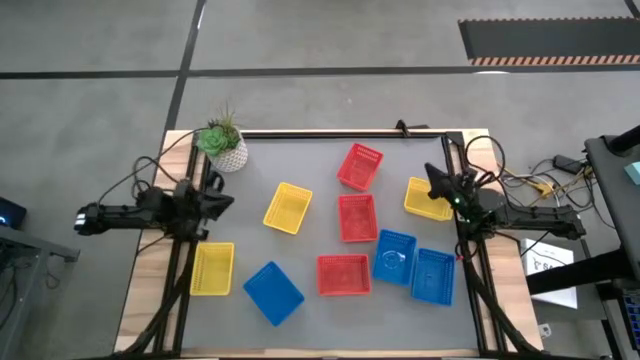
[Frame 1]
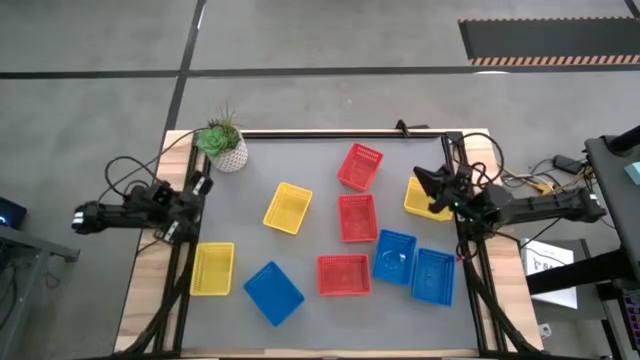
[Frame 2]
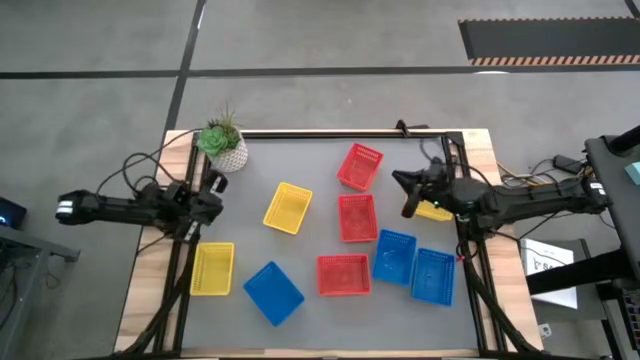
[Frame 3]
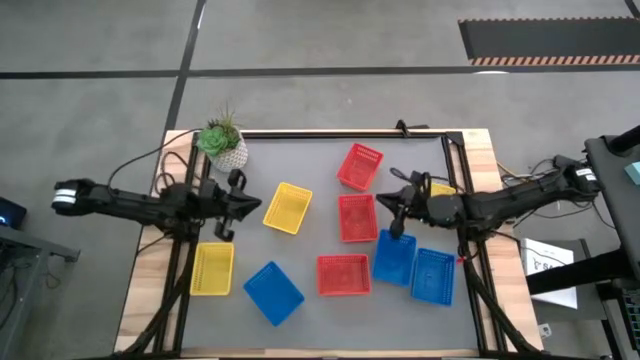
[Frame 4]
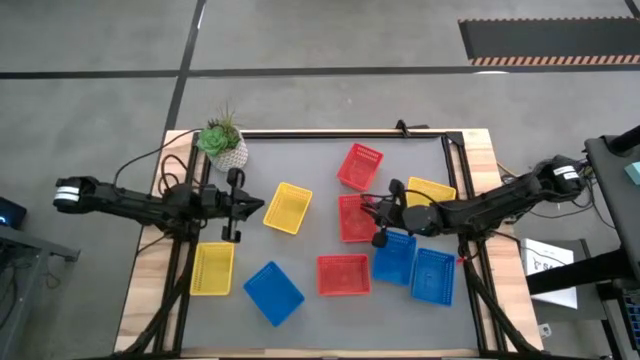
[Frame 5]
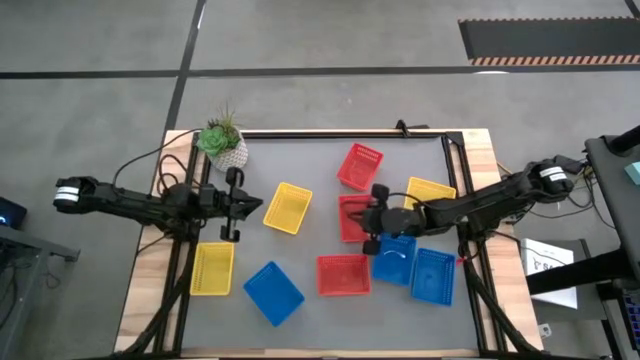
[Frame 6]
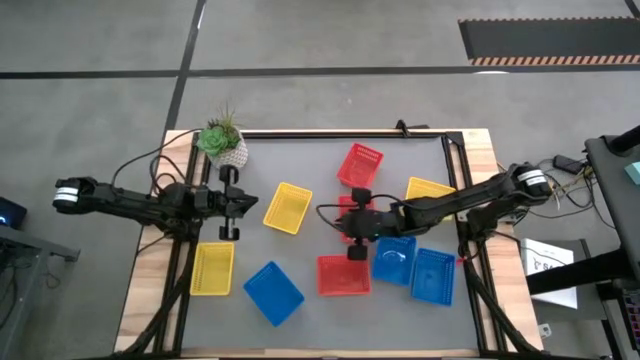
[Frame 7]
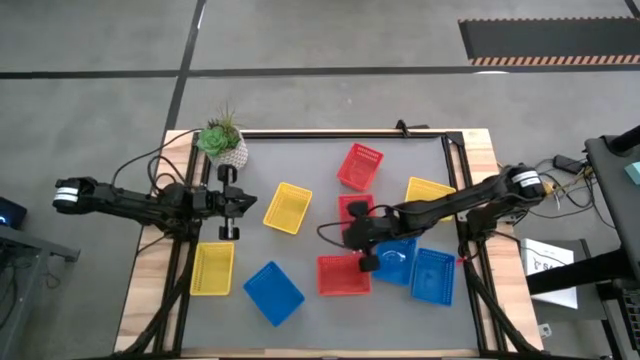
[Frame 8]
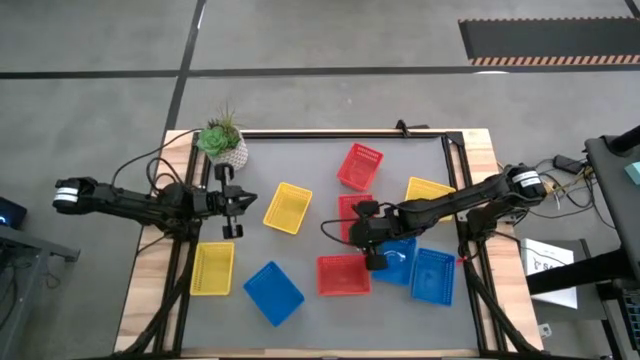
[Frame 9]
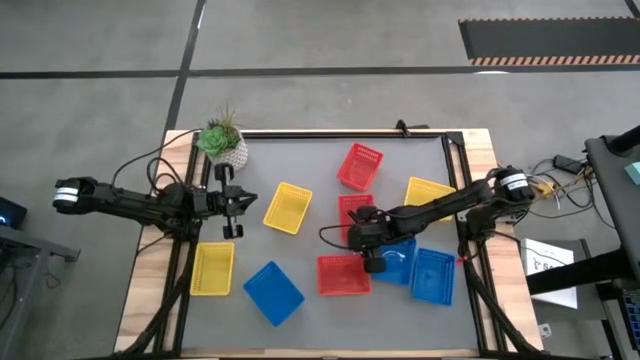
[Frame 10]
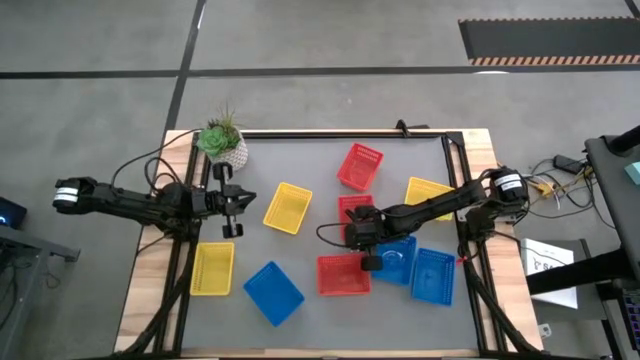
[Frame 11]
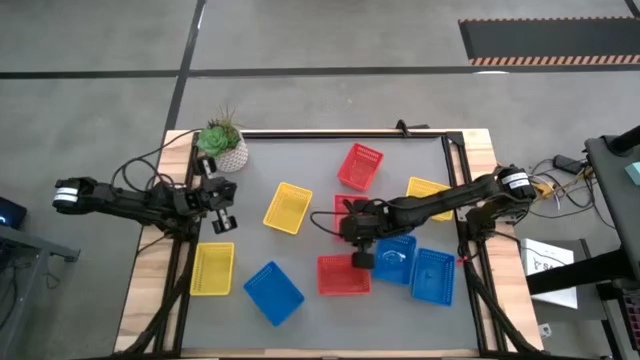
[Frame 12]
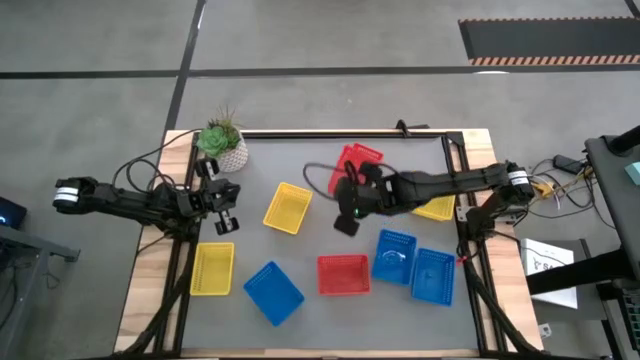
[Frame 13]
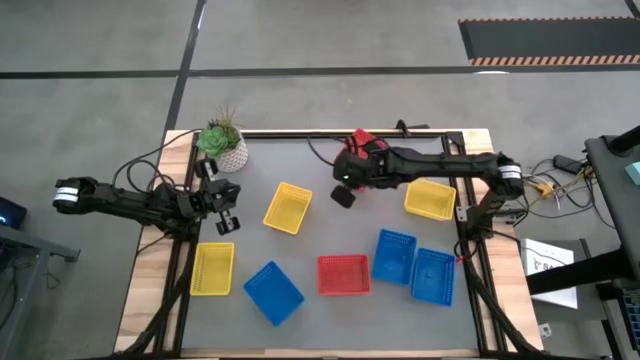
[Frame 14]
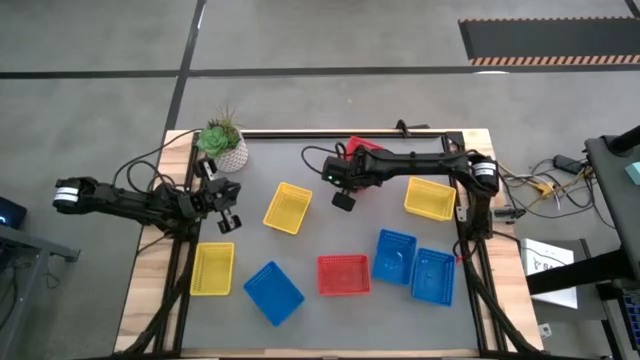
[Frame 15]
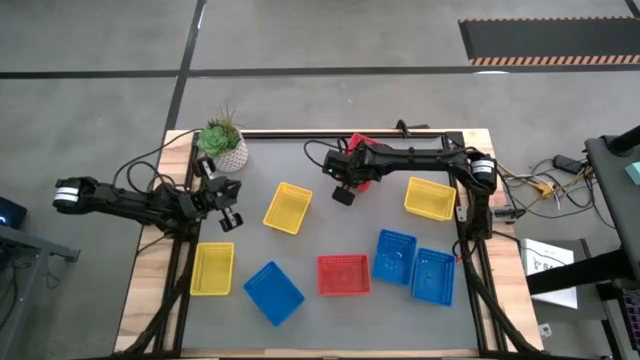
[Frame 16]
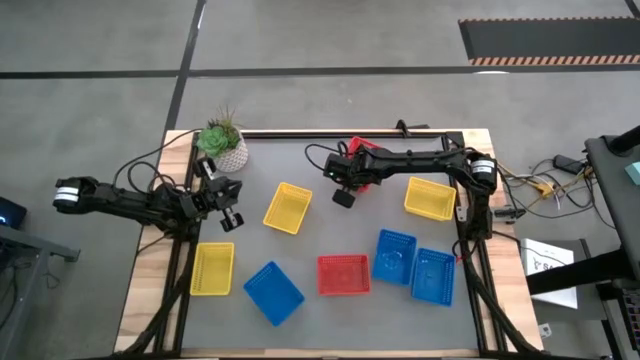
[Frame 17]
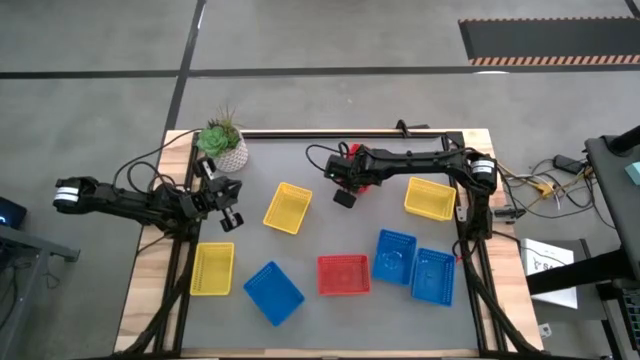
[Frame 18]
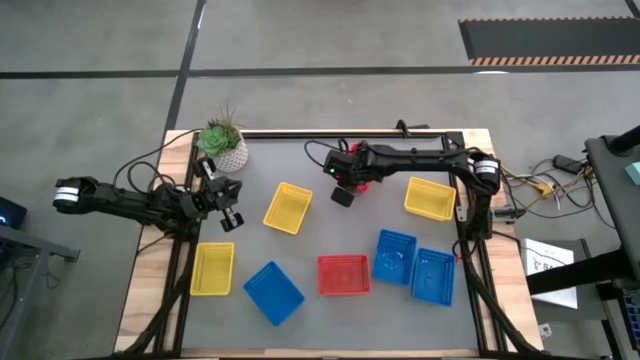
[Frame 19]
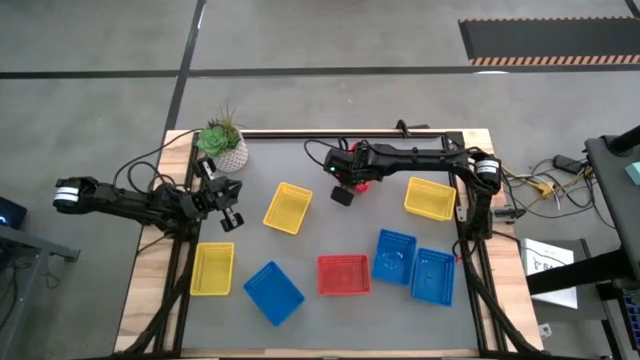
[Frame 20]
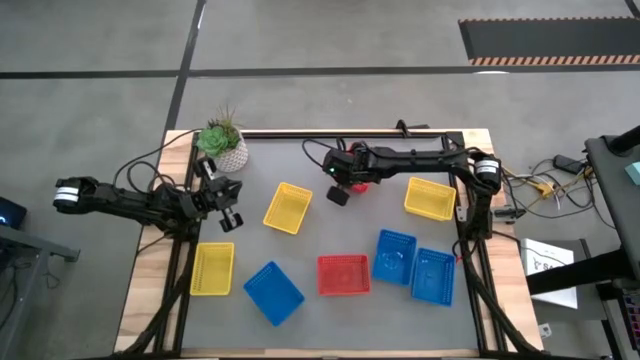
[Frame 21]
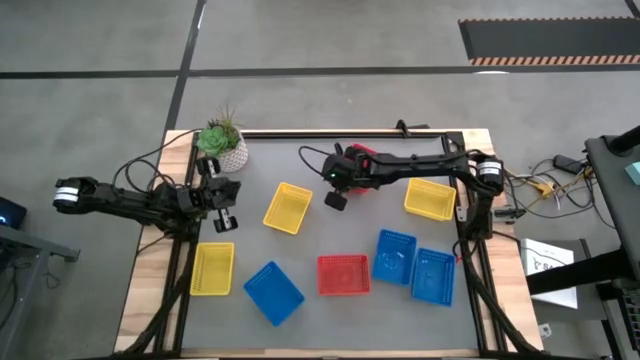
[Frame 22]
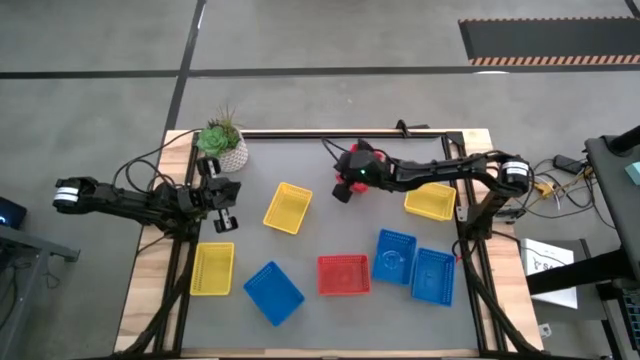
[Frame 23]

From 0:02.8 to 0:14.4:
Stack the middle red bin on the top red bin

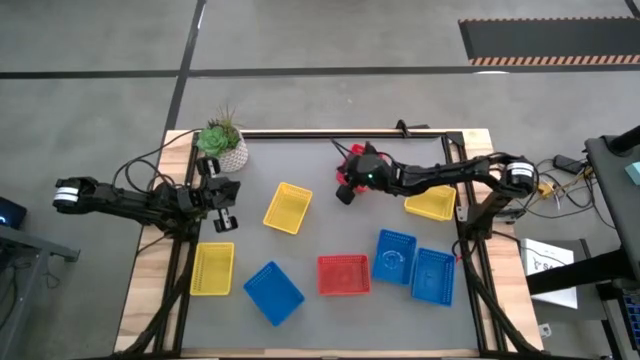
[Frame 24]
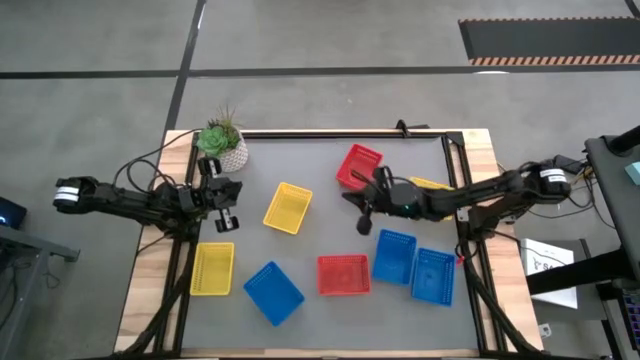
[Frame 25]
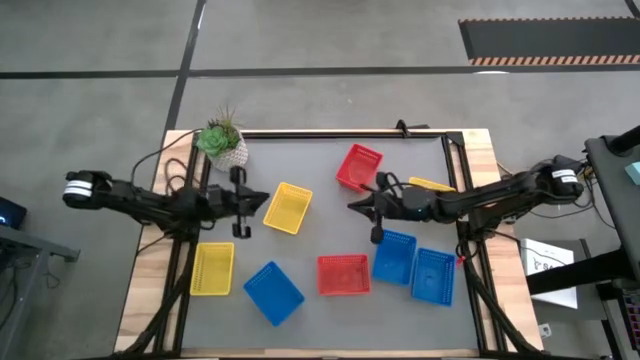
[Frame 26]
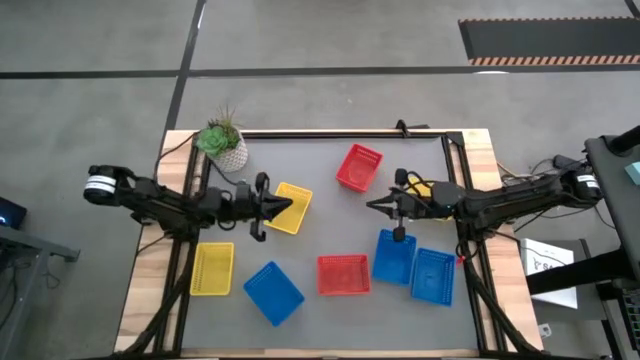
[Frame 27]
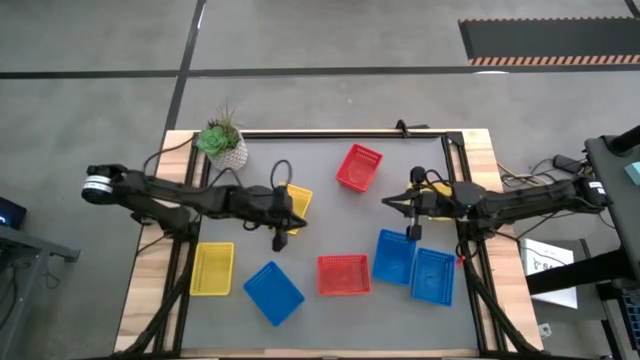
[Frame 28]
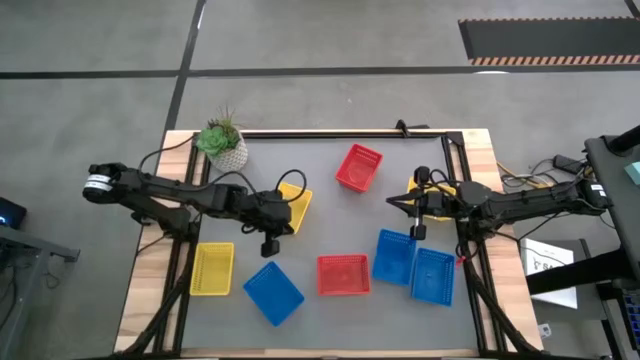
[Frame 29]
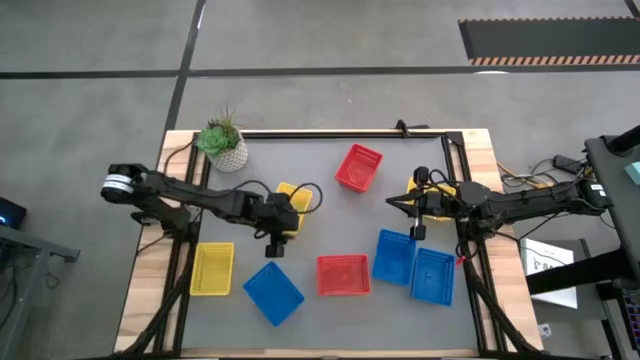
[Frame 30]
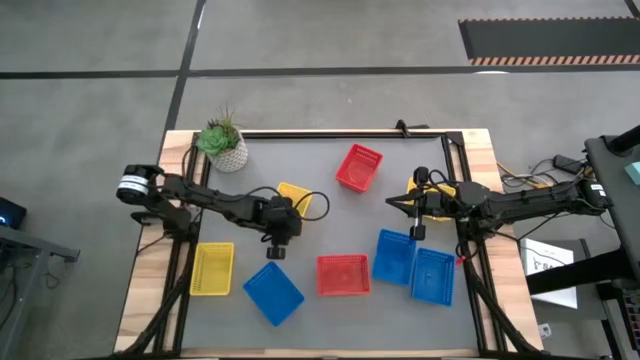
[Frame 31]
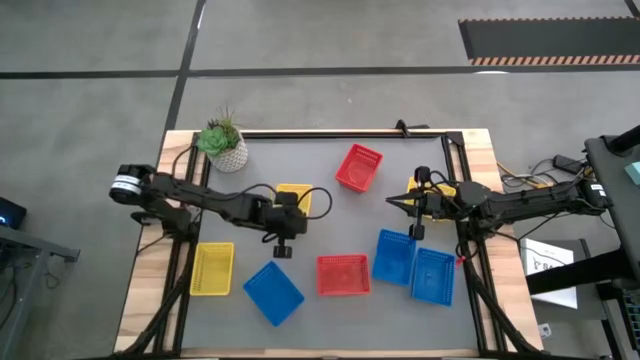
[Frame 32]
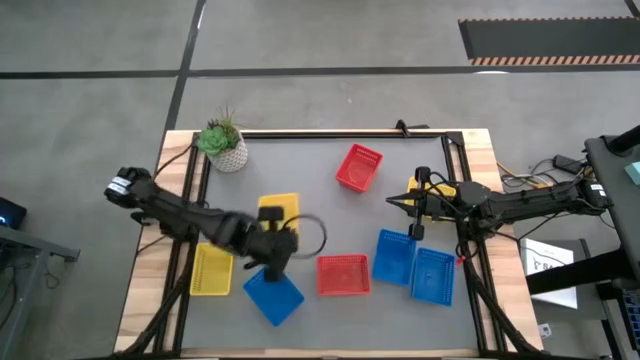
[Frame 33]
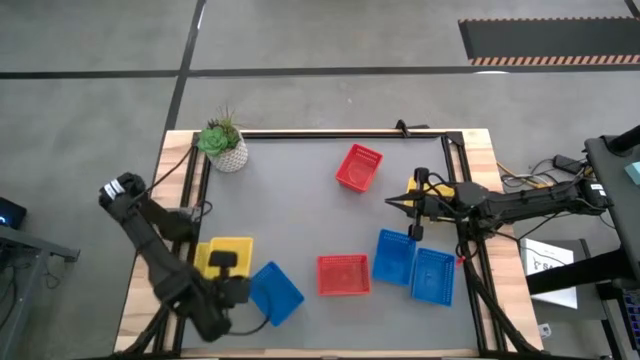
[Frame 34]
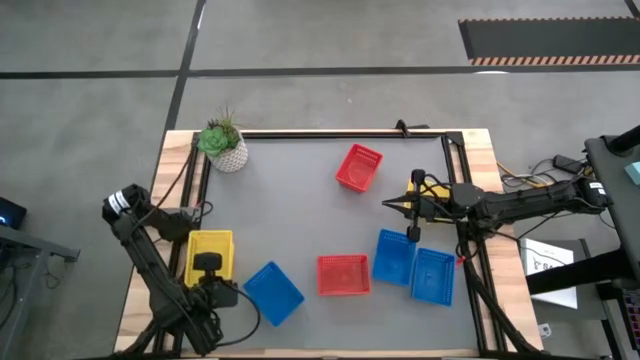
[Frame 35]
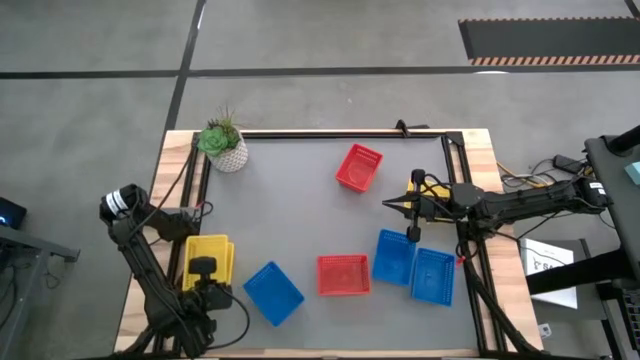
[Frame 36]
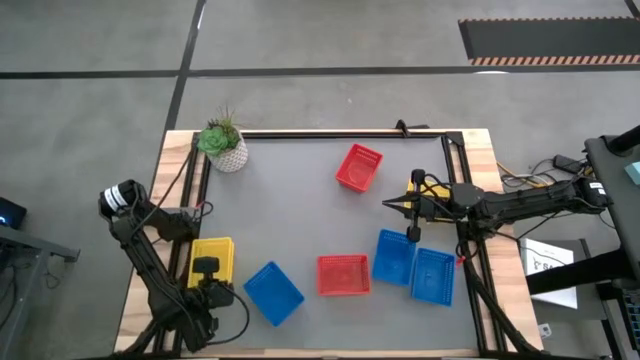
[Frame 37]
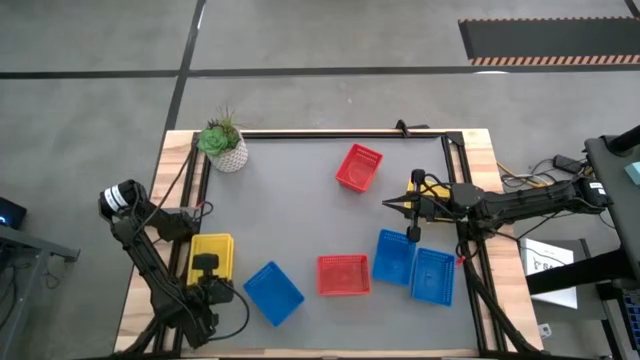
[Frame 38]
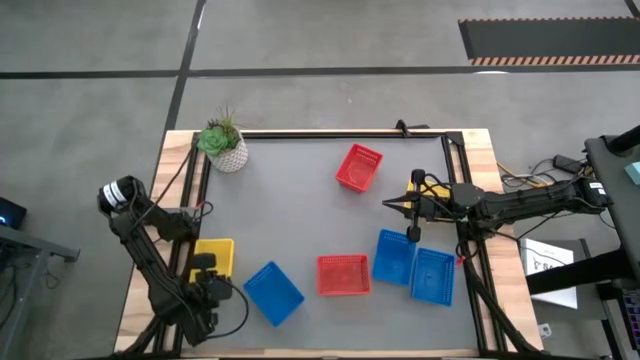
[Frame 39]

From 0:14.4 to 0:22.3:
Stack the top left yellow bin on the bottom yellow bin
